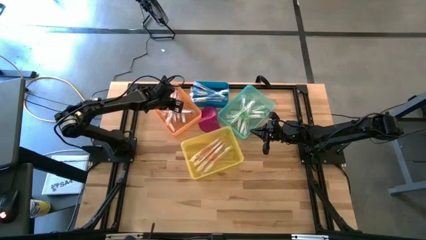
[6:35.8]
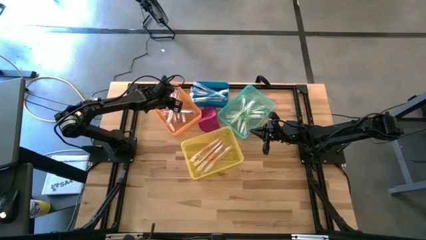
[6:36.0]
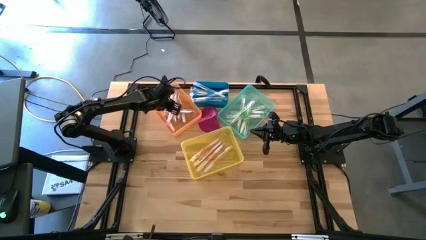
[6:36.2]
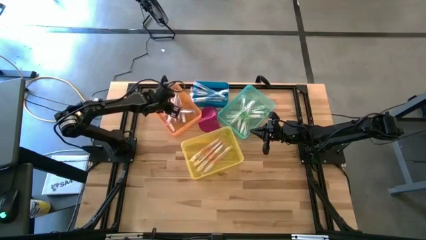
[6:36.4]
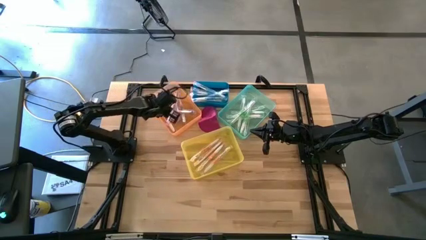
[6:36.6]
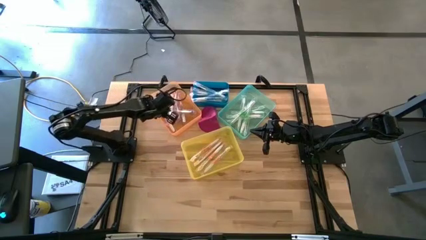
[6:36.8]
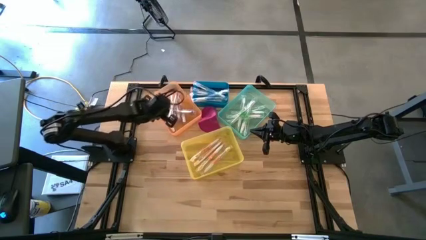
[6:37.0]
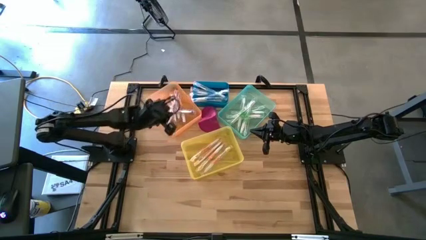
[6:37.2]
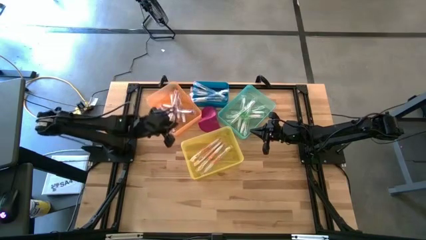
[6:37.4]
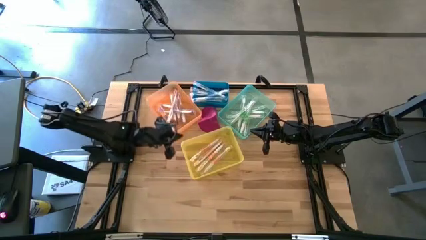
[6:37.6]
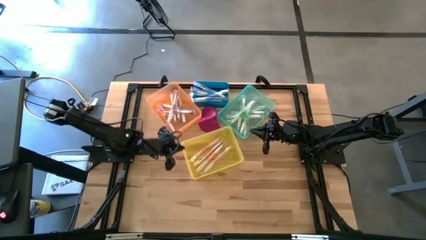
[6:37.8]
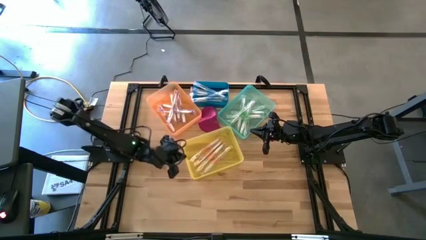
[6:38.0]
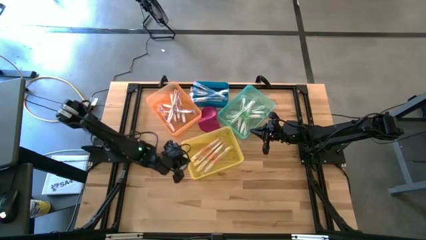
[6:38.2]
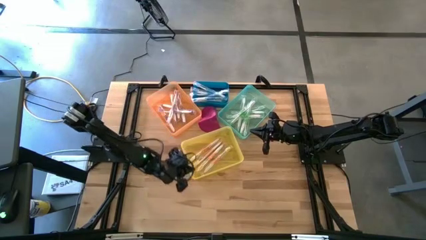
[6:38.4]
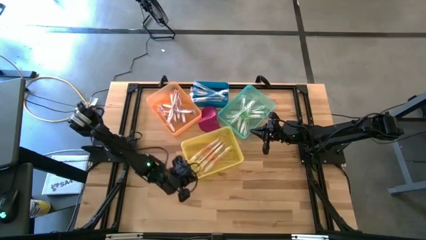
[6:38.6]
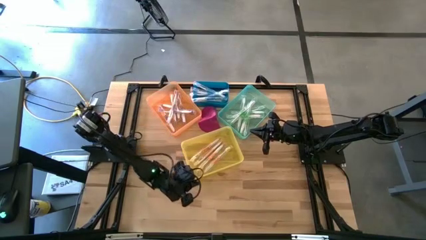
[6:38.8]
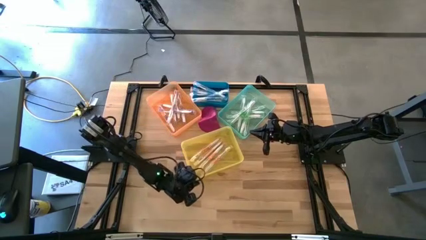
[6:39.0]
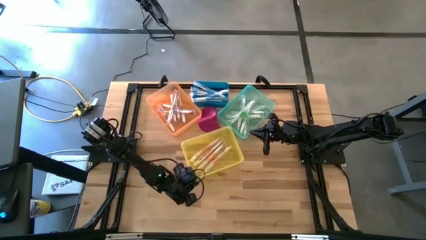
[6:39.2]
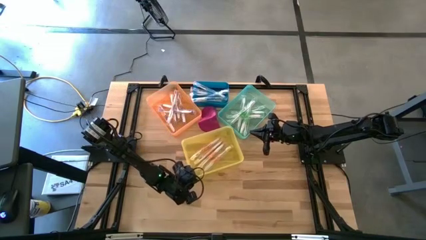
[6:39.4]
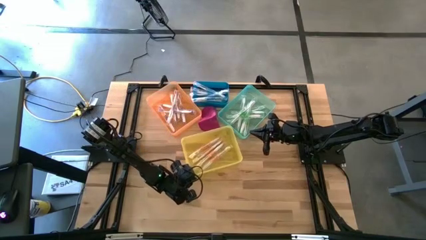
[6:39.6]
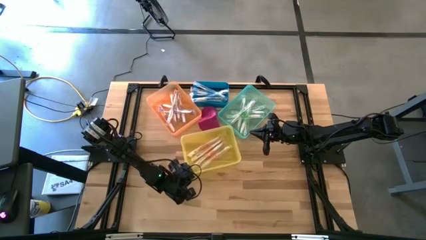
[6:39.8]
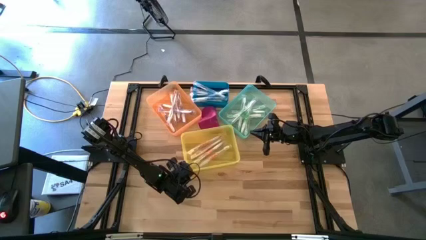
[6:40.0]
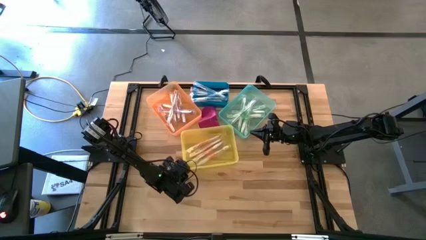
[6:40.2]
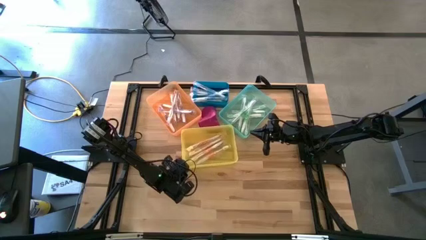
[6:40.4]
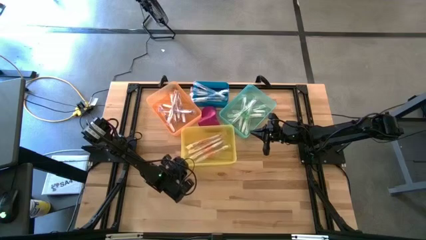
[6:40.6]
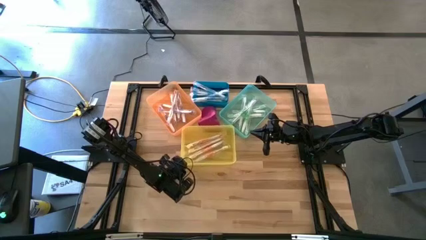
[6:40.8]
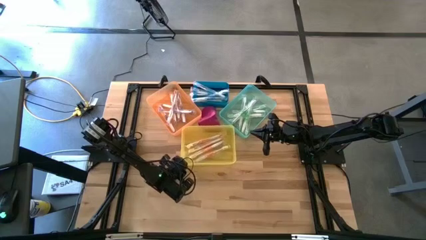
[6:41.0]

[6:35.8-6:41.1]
Task: Pick & Place Toothbrushes
Adjust the yellow bin

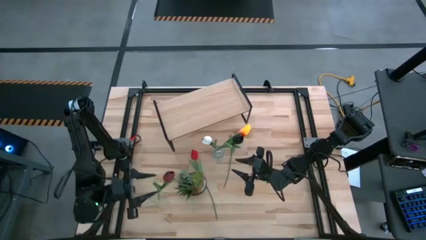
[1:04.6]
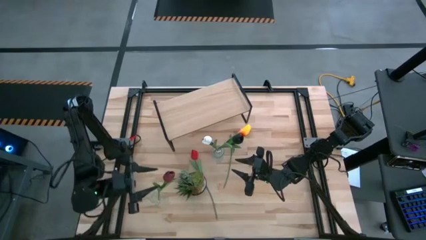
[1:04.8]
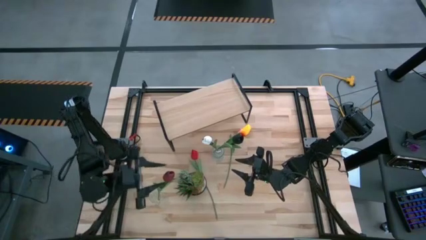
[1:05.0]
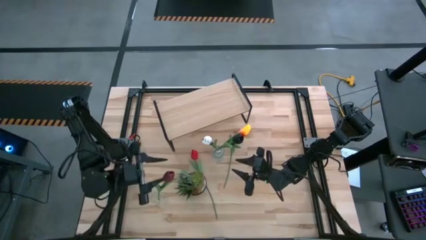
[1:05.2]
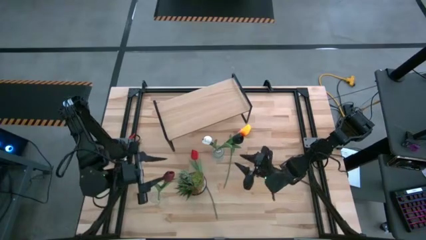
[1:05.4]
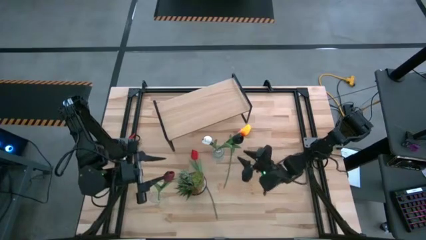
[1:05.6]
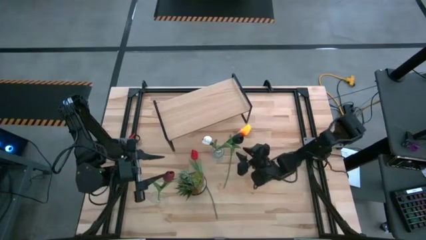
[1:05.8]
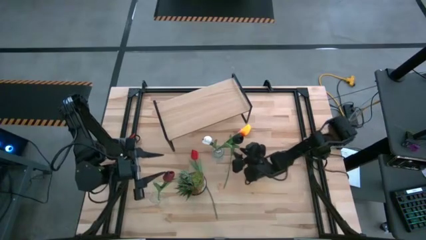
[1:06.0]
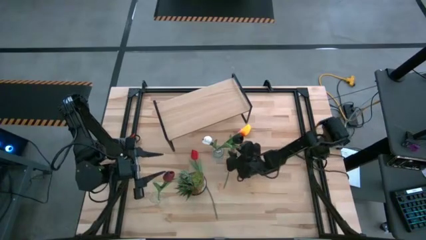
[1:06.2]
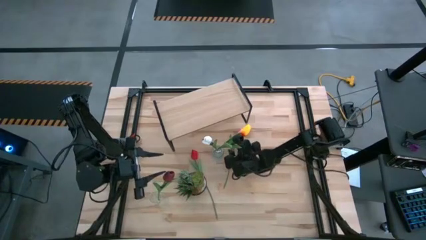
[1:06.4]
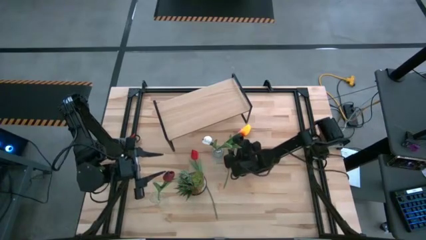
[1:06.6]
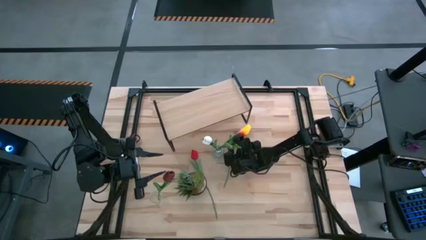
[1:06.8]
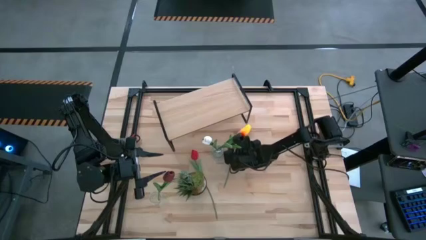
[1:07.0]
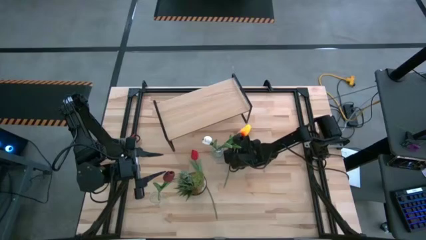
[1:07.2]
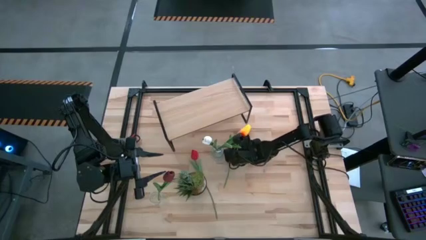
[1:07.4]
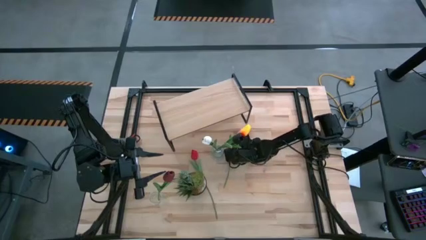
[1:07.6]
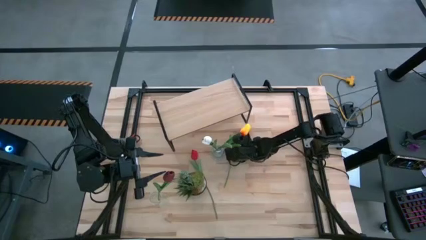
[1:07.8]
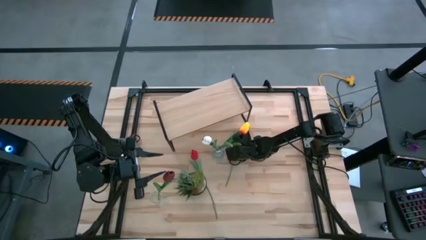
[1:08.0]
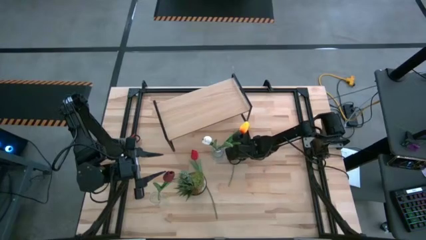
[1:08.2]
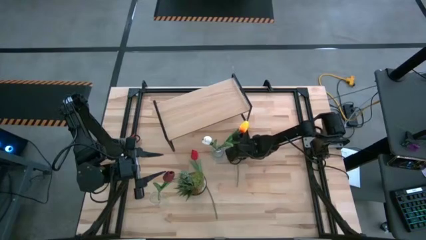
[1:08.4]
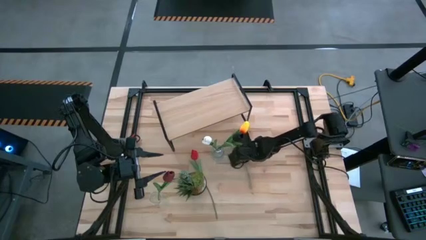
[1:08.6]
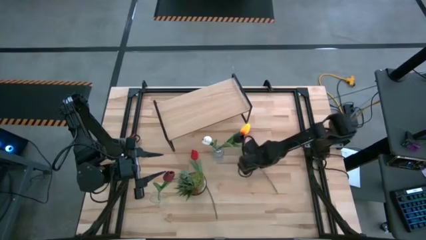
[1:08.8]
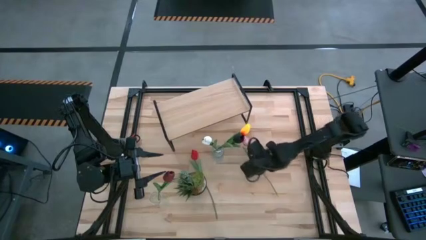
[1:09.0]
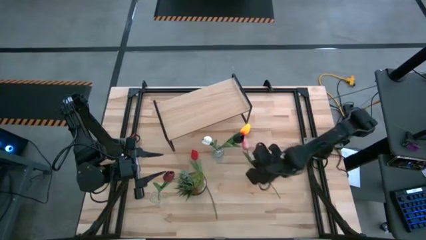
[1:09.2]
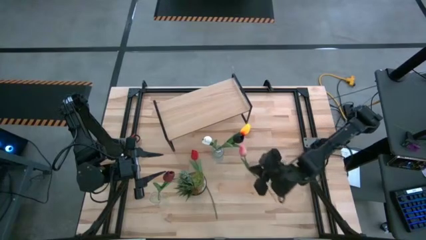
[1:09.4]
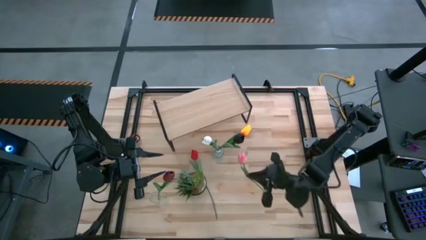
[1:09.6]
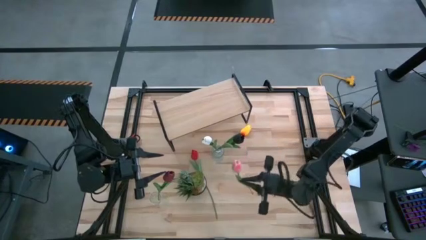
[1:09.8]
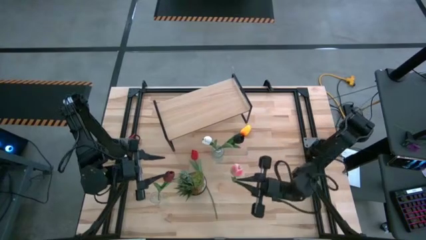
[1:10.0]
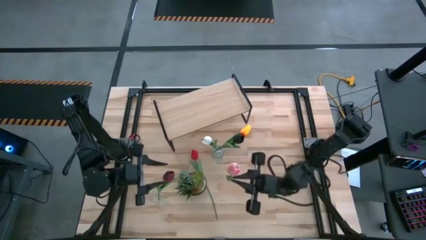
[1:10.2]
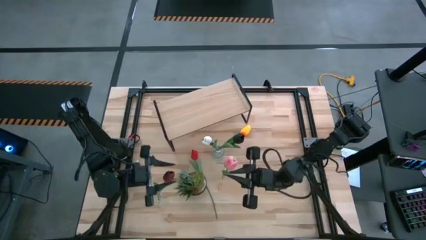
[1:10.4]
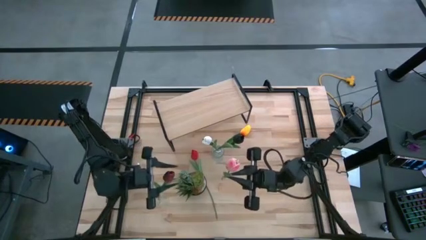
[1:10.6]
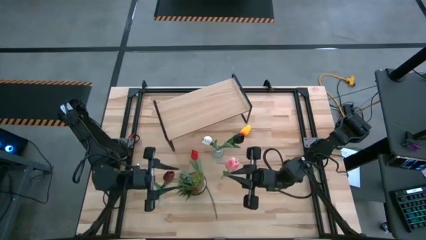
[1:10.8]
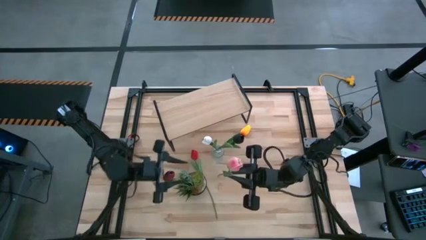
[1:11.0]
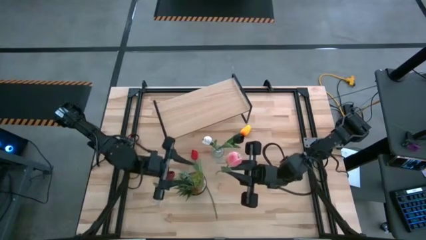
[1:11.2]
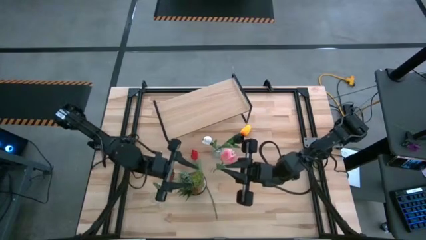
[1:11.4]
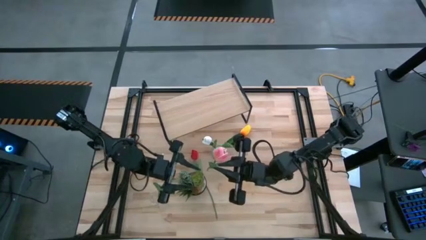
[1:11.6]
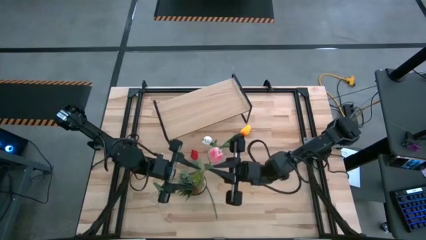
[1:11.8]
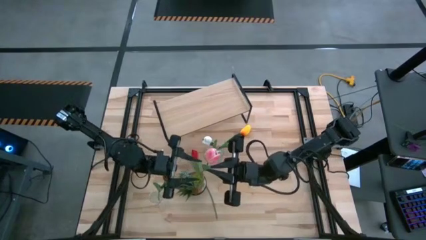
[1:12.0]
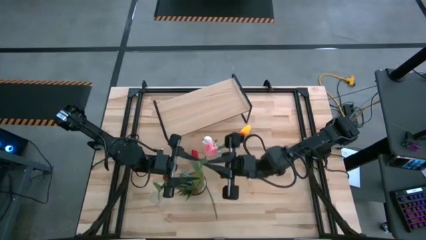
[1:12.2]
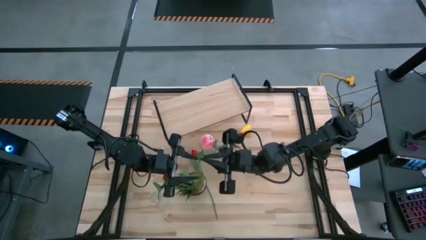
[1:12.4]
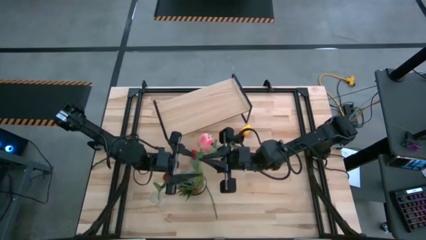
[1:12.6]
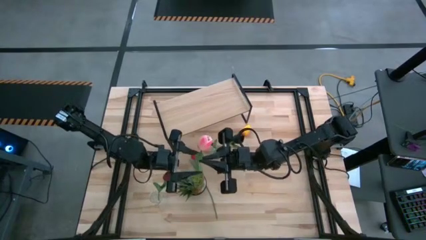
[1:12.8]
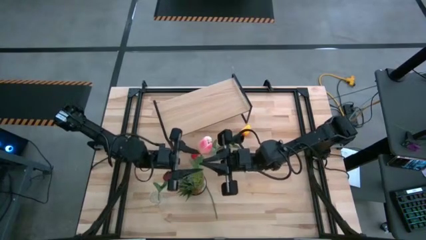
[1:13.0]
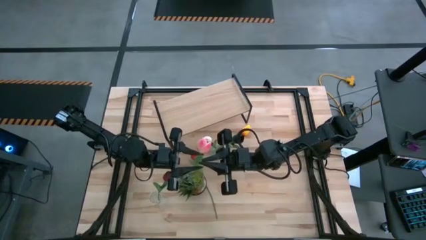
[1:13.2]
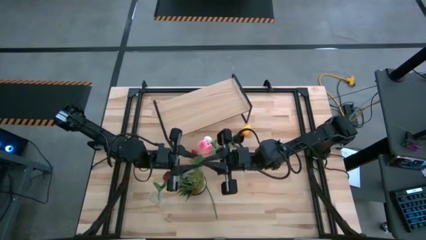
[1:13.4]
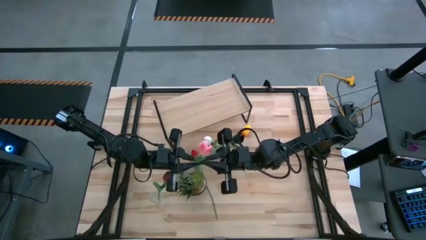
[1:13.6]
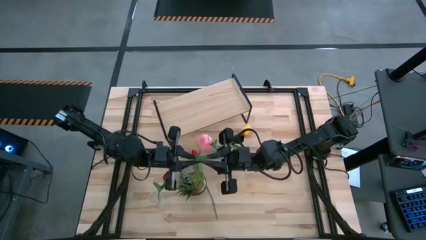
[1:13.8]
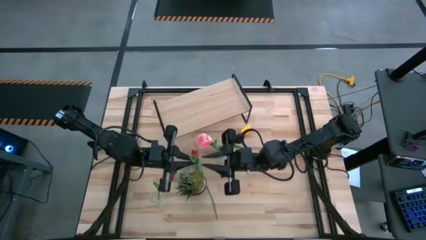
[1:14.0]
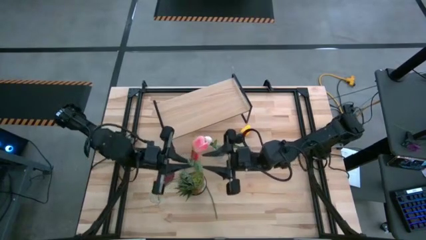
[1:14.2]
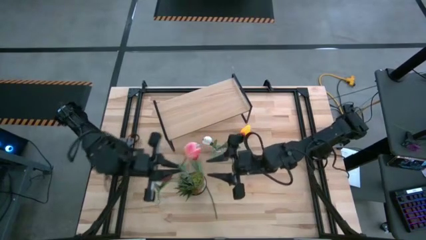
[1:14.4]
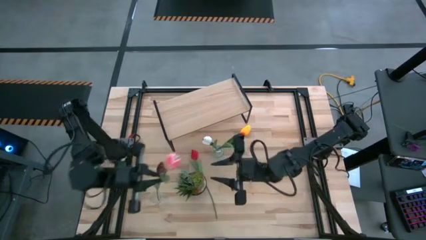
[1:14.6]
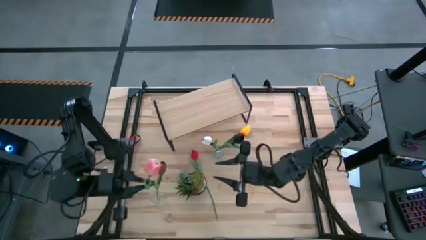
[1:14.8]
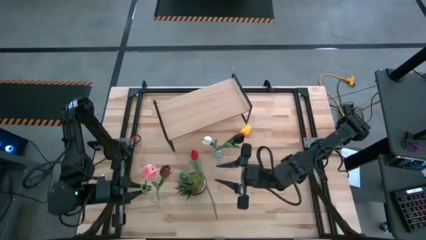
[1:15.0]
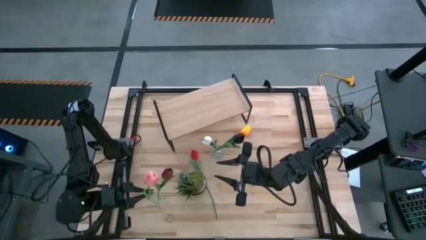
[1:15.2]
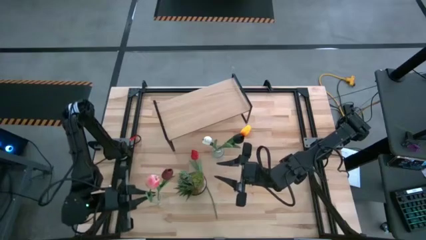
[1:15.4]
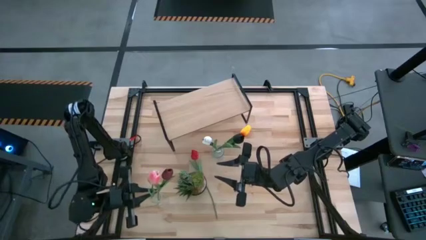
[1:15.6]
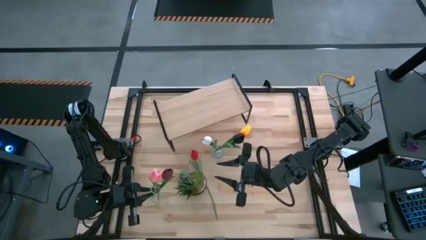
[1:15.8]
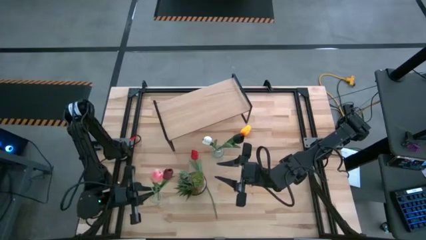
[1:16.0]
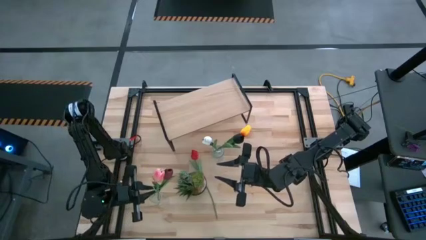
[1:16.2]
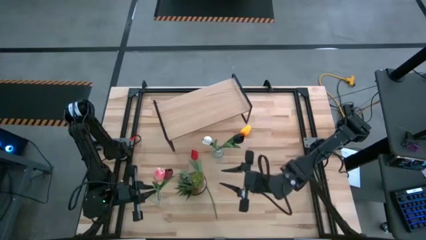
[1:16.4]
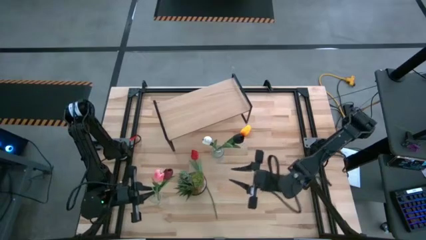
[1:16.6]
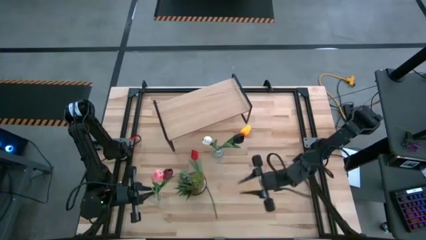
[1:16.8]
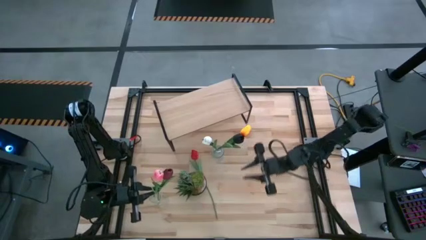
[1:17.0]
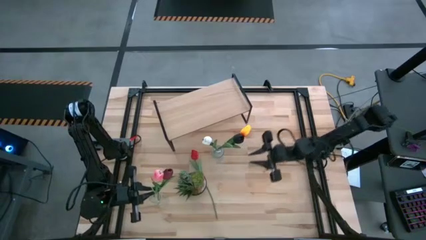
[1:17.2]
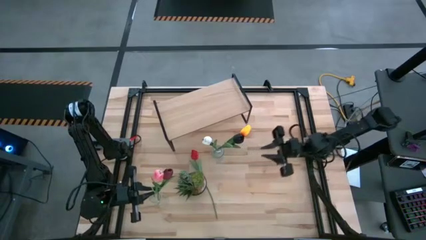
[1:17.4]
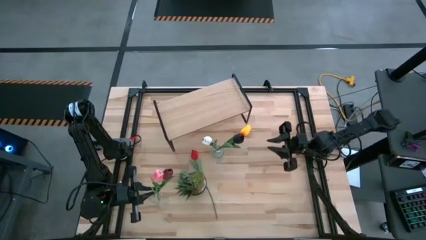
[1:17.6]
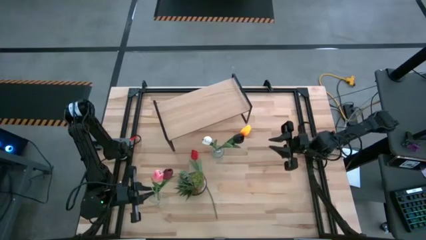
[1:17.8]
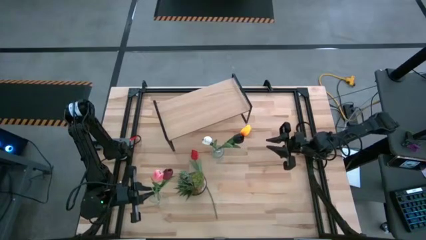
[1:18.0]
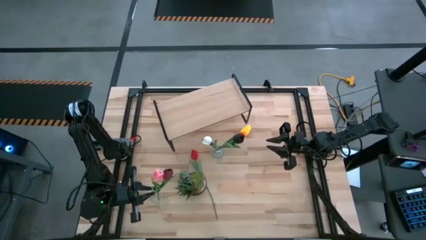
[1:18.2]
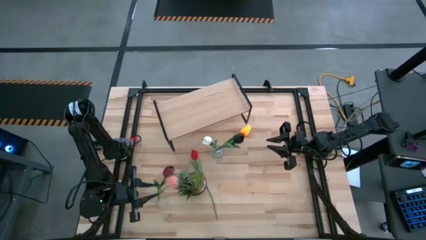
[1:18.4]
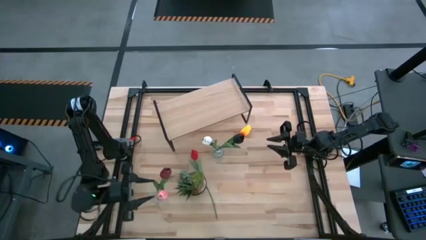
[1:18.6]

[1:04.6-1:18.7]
Task: Pick and place flowers into a vace then onto a shelf
Put the pink tulip into the bottom transparent vase
